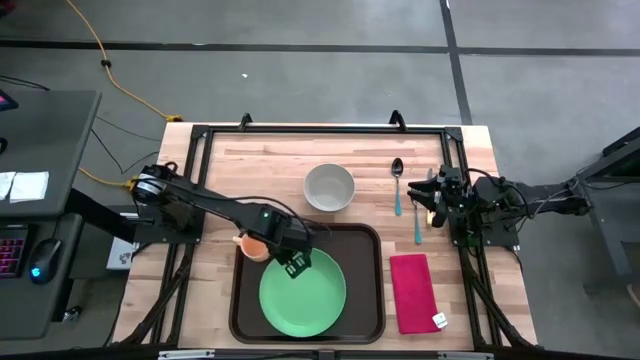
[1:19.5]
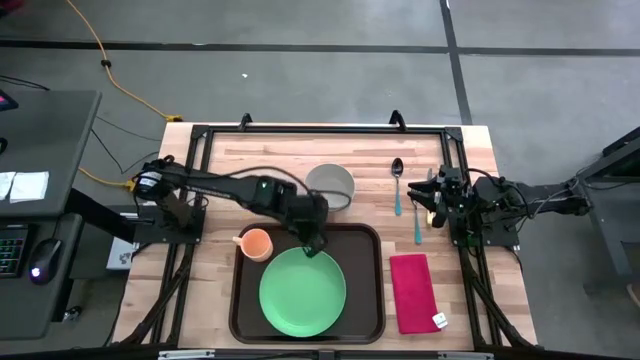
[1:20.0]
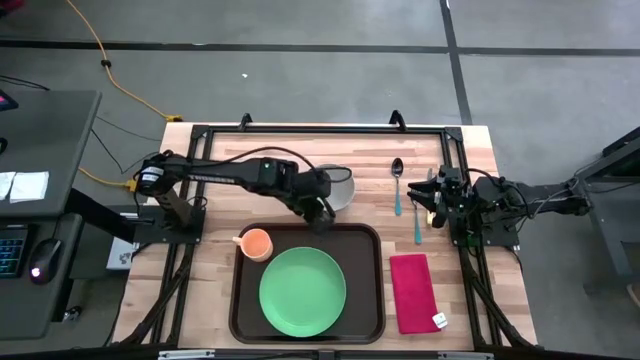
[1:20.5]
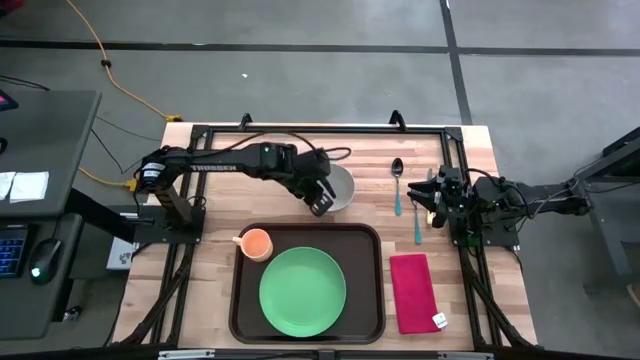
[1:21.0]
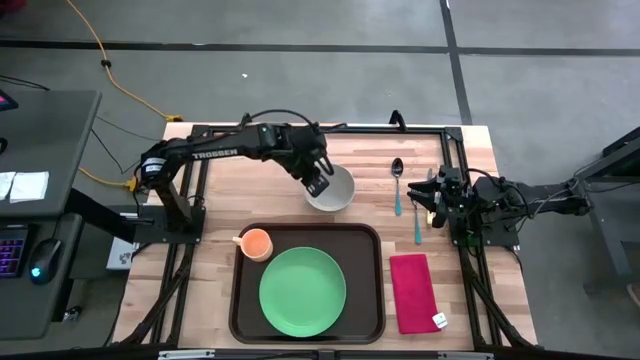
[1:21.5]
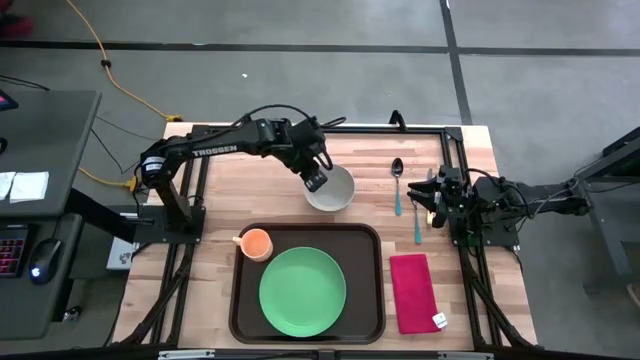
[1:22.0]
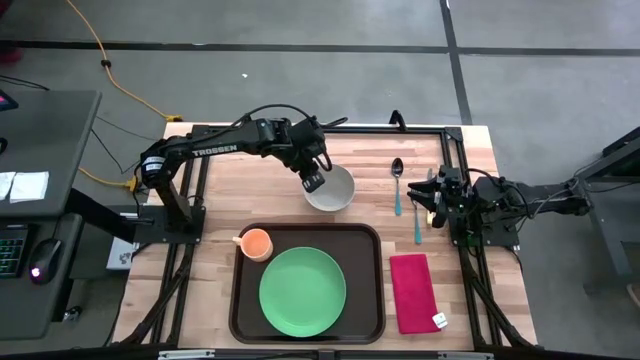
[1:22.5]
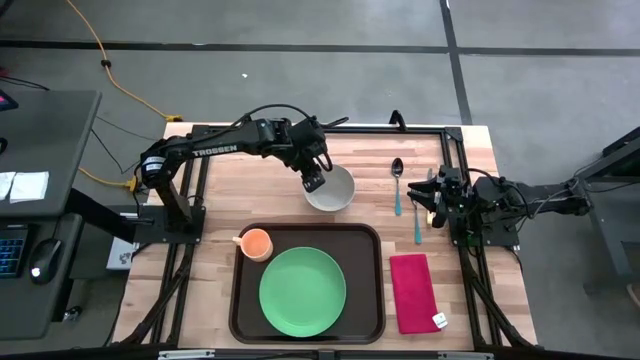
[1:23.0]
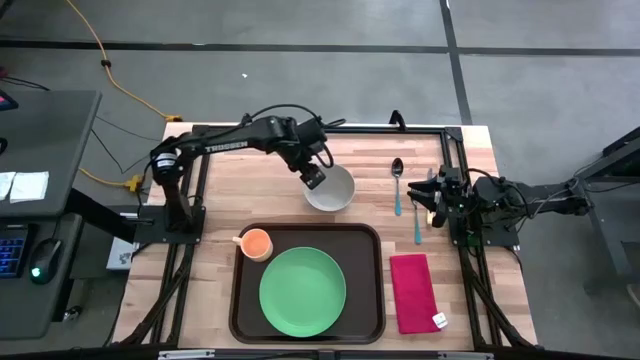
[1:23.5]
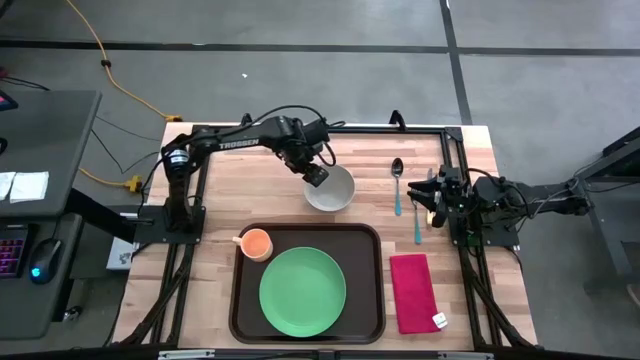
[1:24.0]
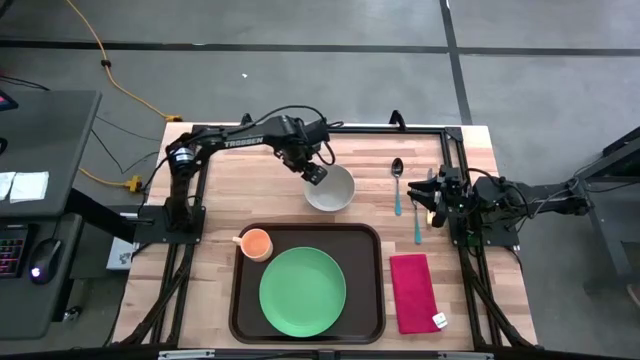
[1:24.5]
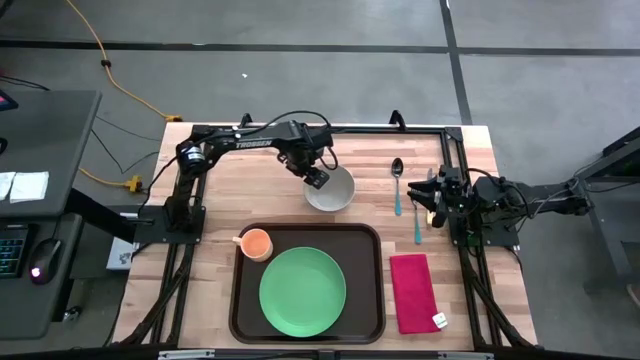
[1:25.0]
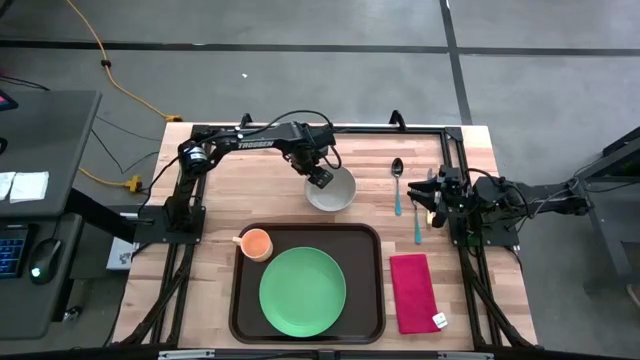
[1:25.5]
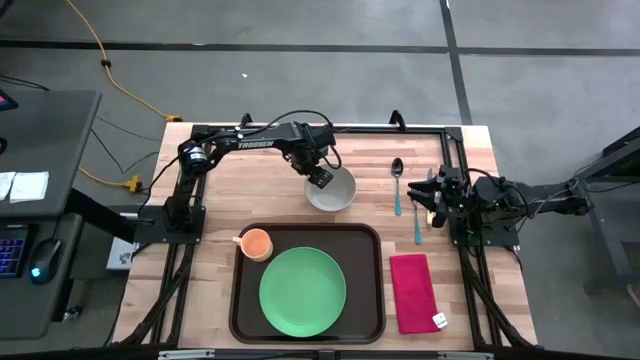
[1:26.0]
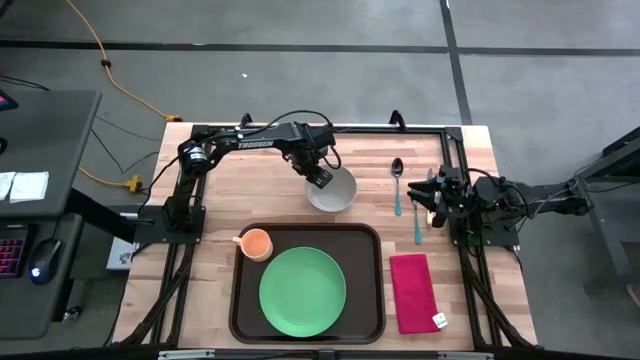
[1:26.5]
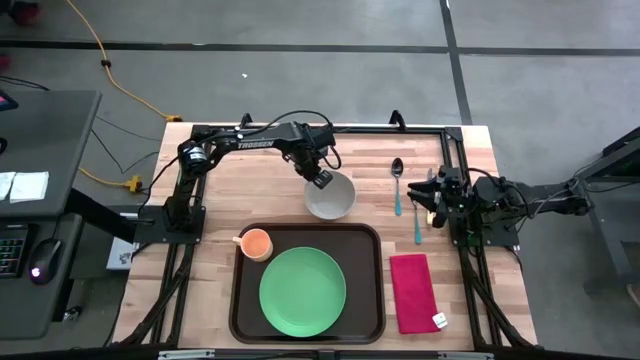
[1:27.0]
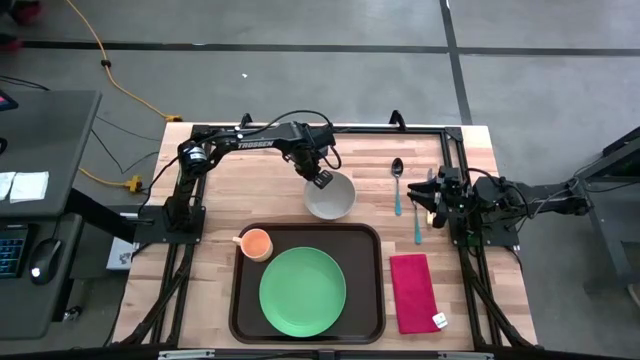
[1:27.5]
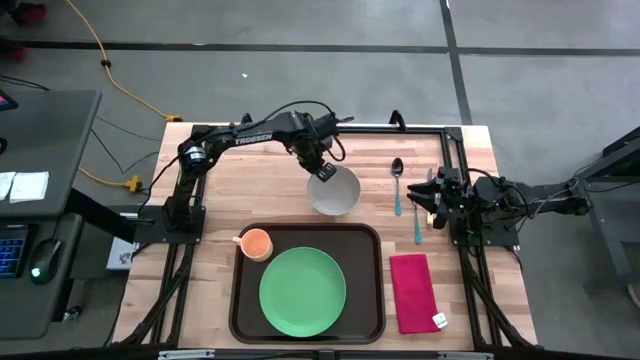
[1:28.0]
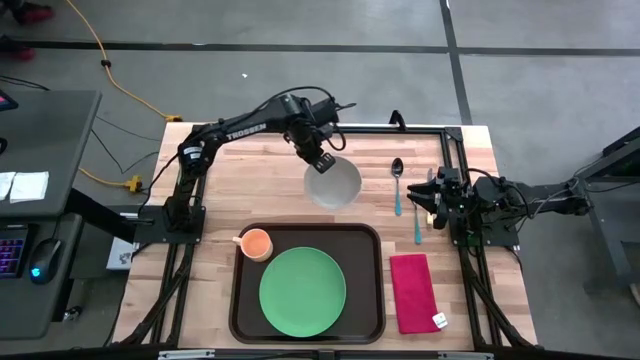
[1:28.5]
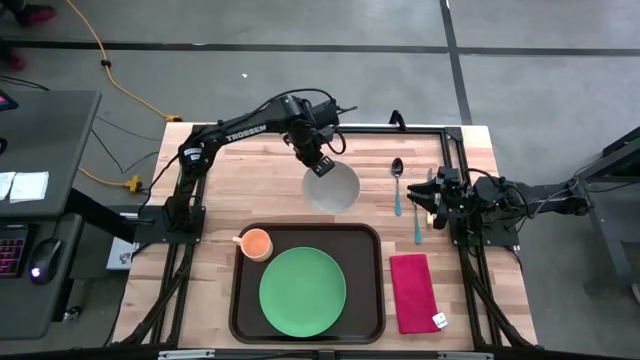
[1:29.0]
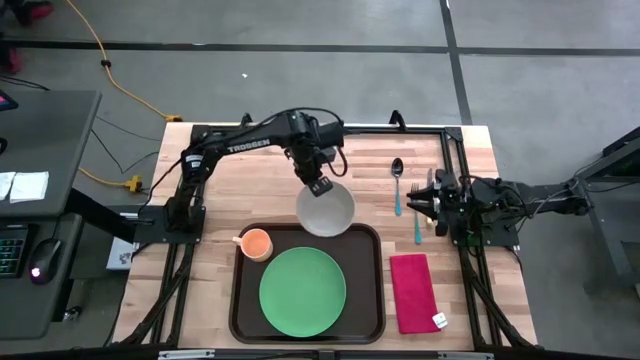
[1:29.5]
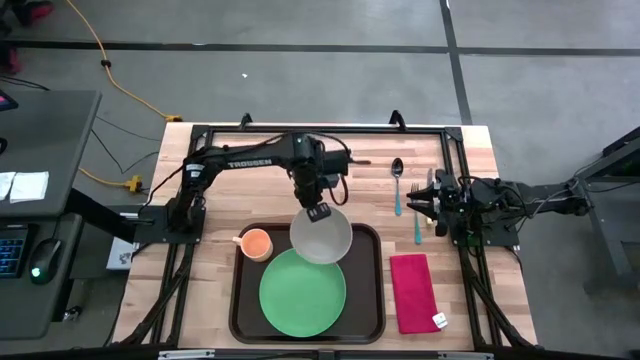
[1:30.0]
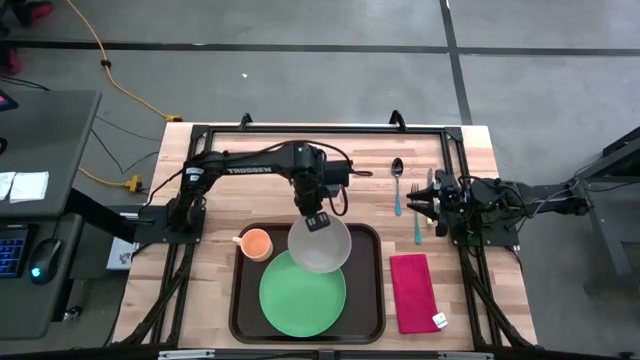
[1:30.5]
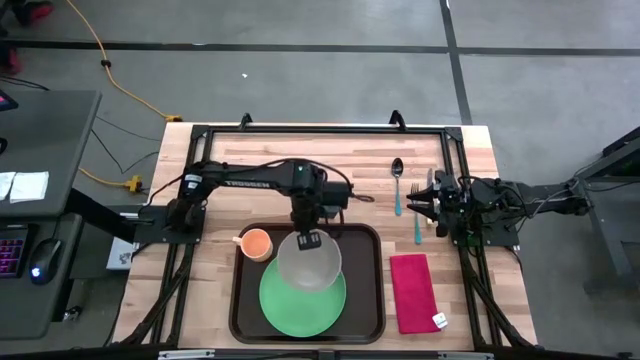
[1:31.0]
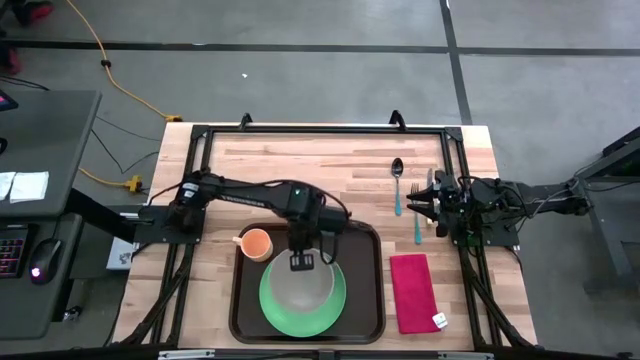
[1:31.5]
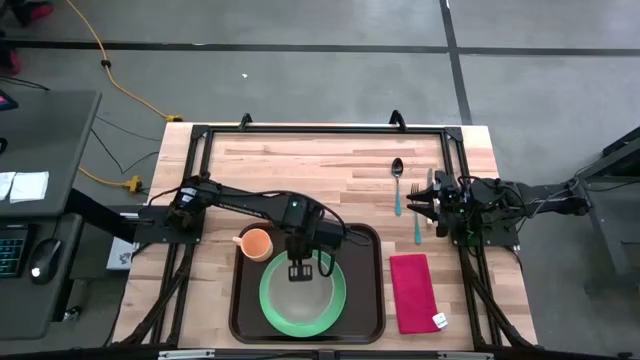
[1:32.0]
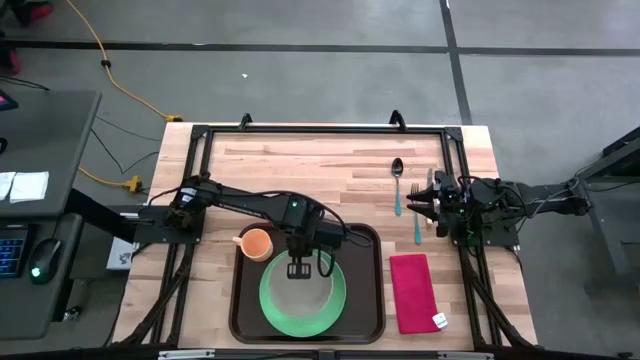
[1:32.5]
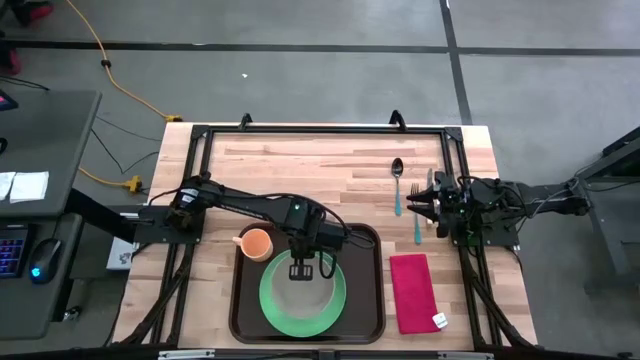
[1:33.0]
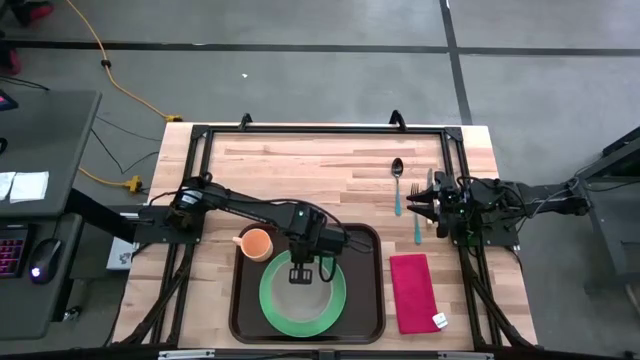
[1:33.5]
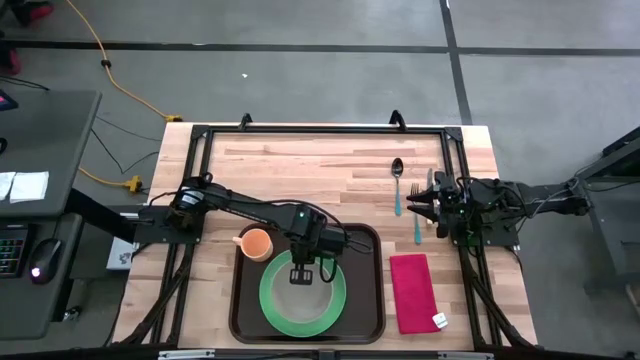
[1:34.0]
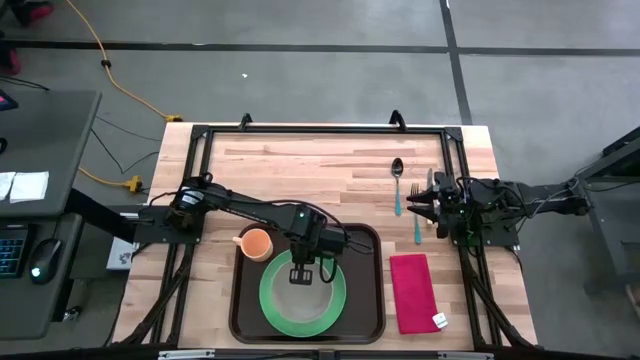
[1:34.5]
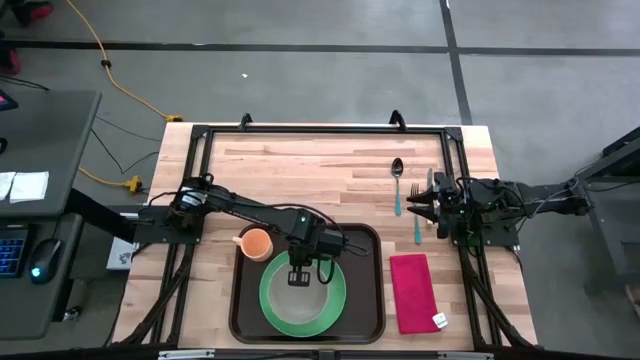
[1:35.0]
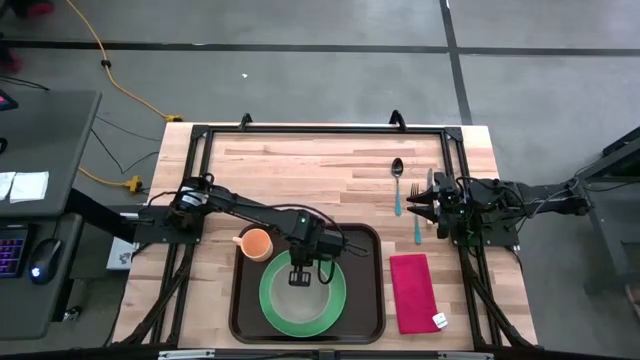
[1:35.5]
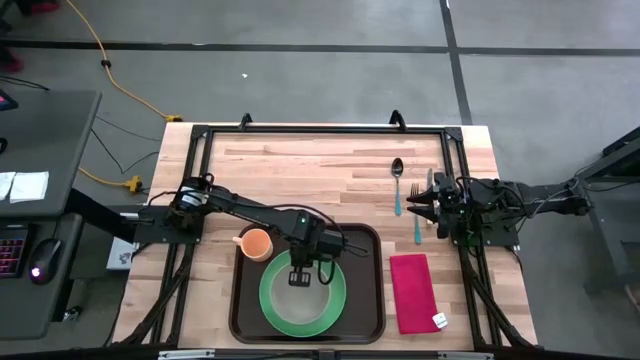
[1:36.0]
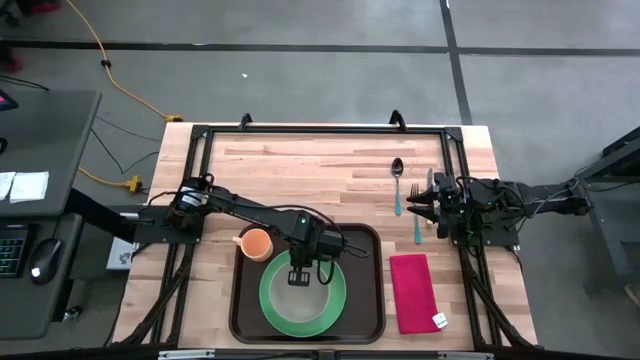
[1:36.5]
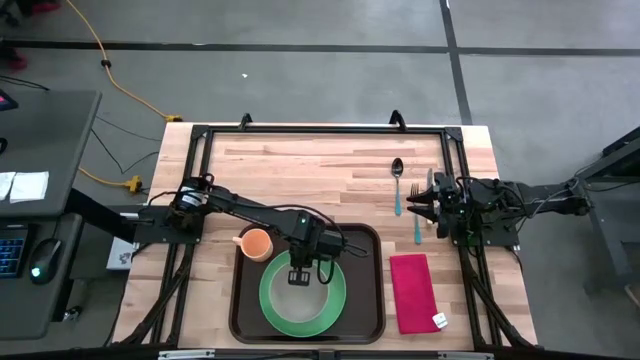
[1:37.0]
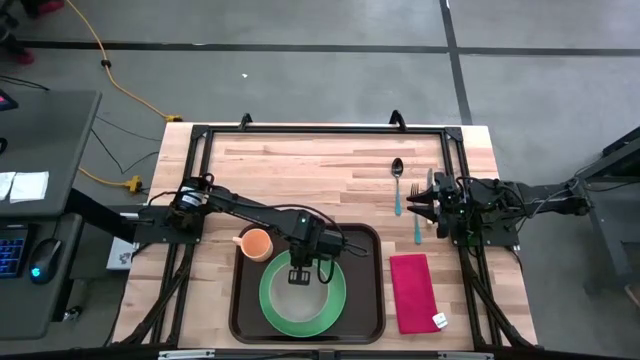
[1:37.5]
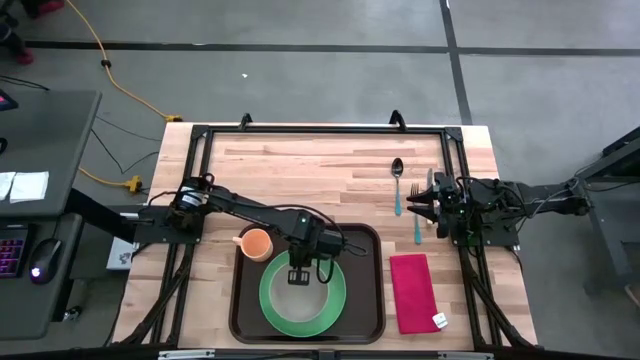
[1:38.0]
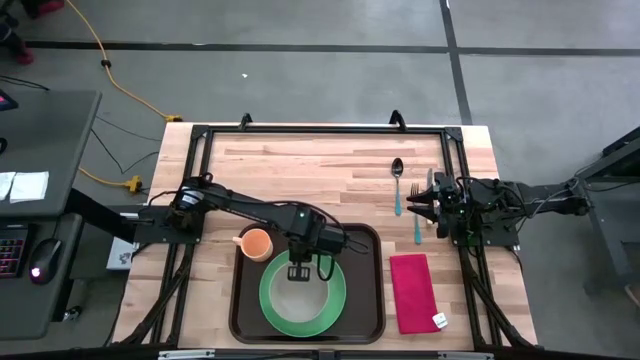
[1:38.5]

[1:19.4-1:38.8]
Task: Set up tray
Stack the white bowl on top of the green plate on the brown tray

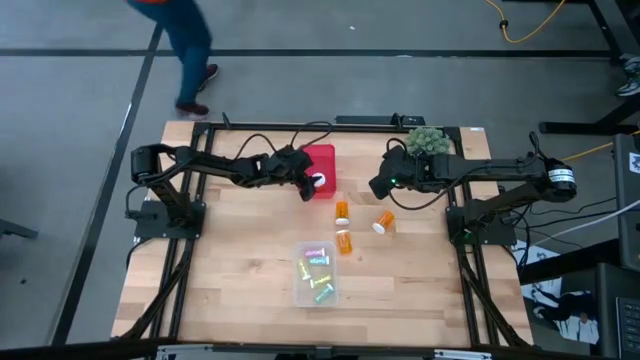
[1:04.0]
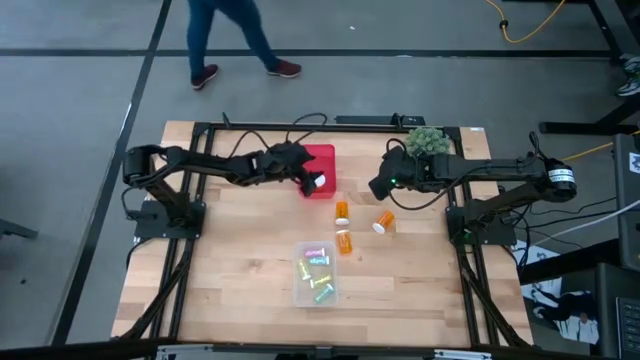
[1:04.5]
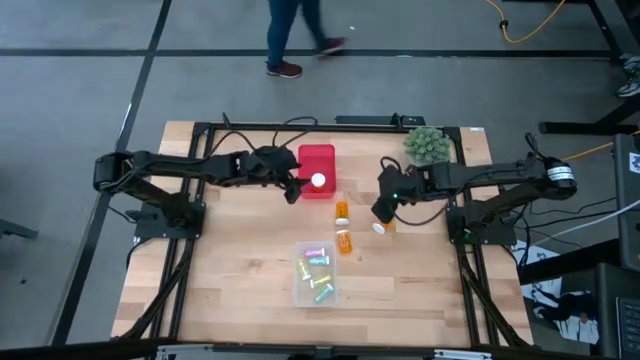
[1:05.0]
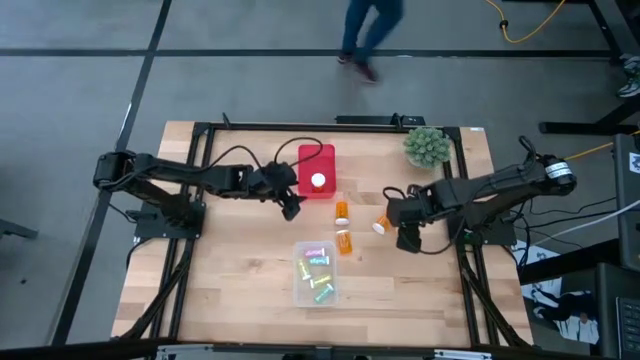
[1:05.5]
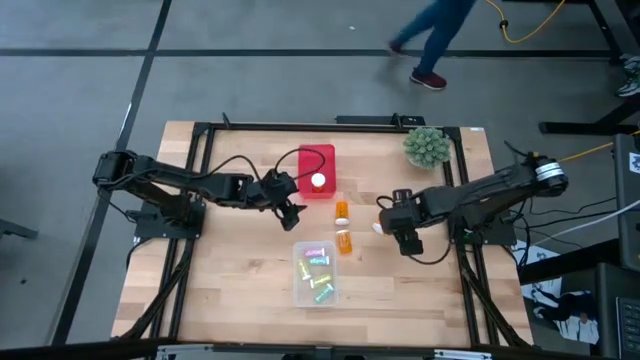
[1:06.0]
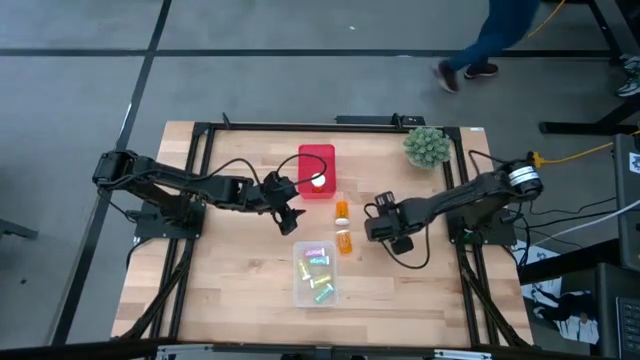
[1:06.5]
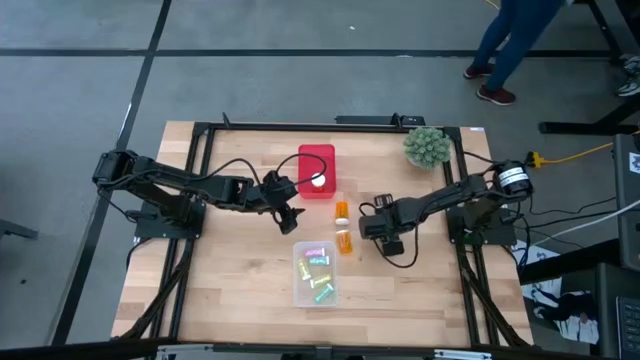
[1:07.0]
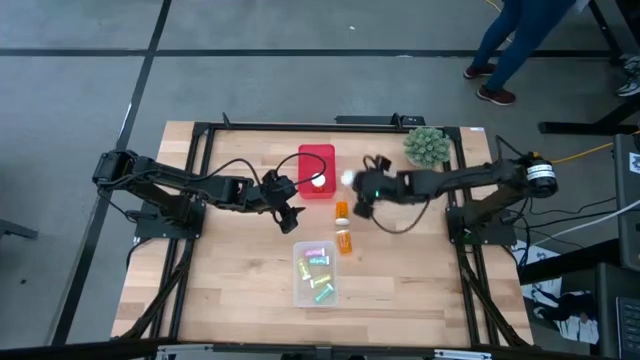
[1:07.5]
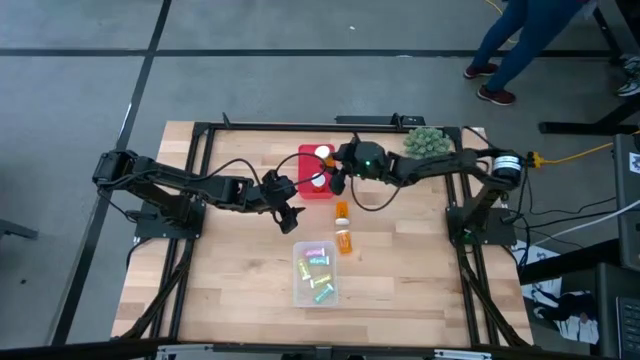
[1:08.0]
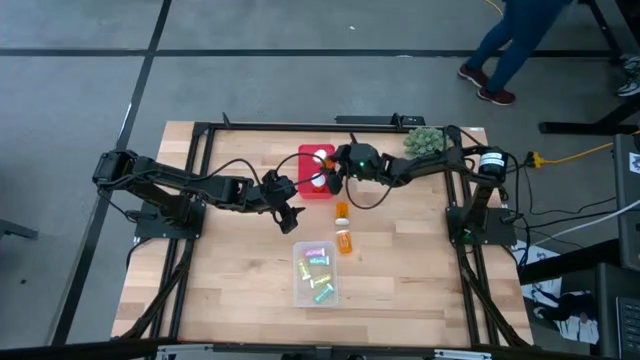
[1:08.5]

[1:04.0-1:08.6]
Task: Pick and place medicine bottles into bin by pill shape (circle, oval)
Put the large orange pill bottle into the red bin
